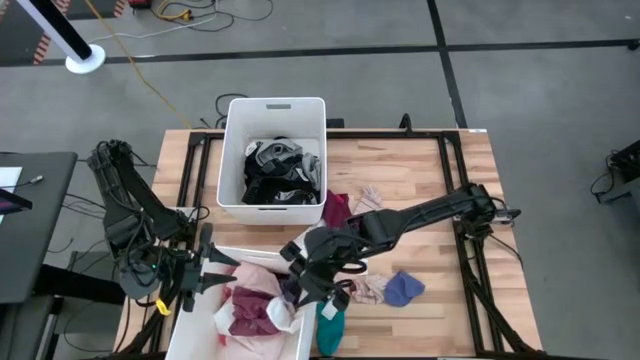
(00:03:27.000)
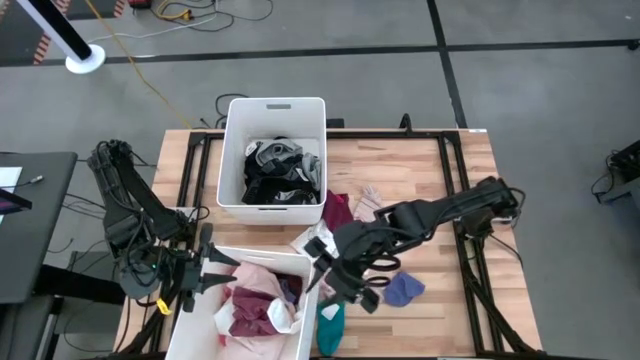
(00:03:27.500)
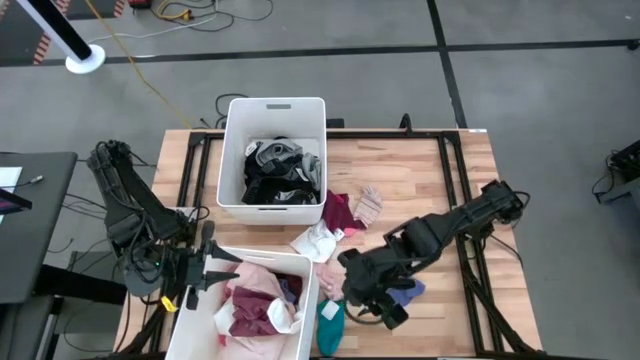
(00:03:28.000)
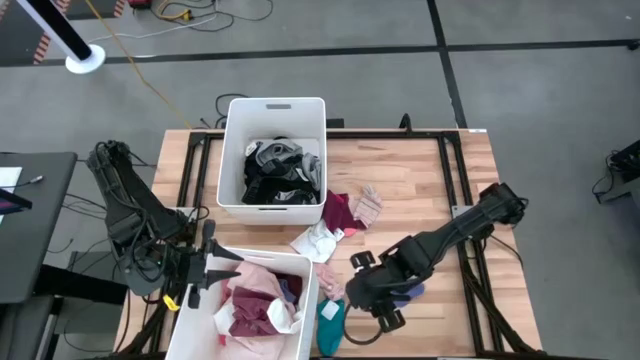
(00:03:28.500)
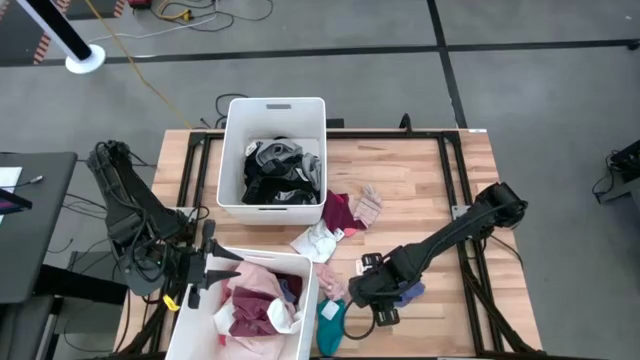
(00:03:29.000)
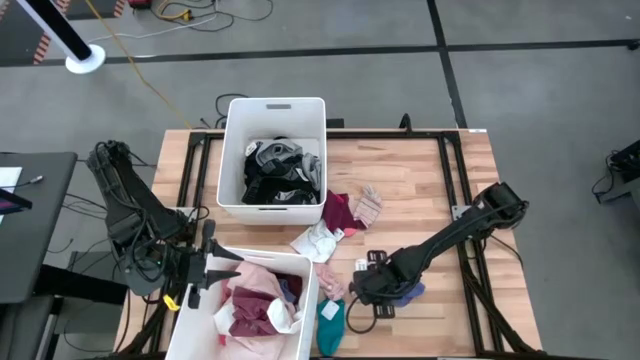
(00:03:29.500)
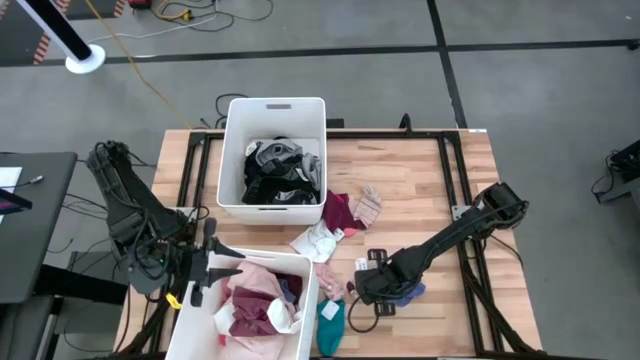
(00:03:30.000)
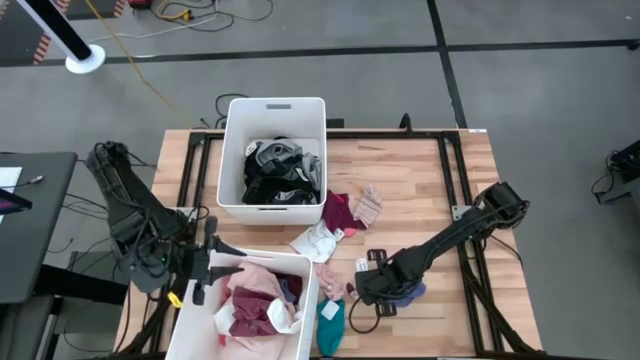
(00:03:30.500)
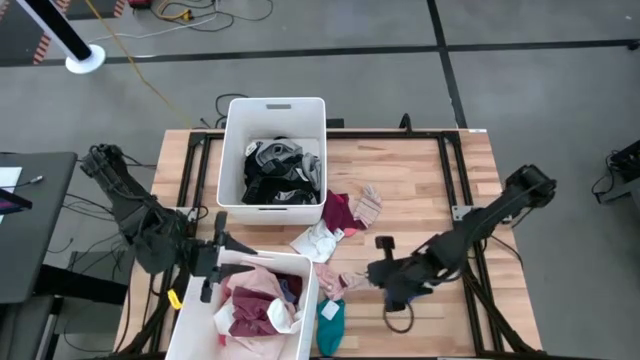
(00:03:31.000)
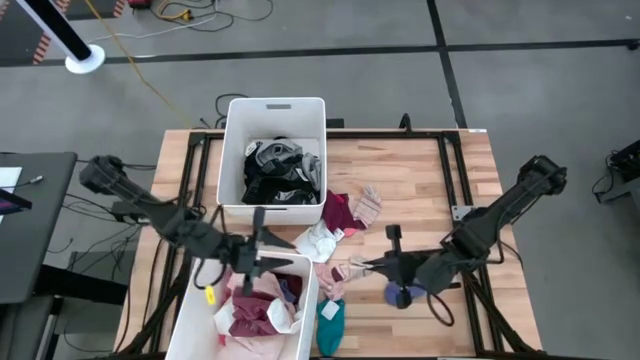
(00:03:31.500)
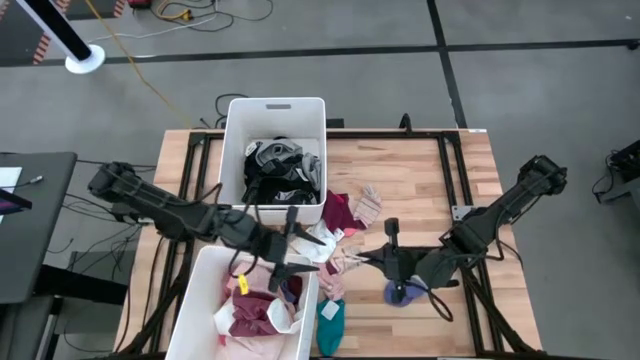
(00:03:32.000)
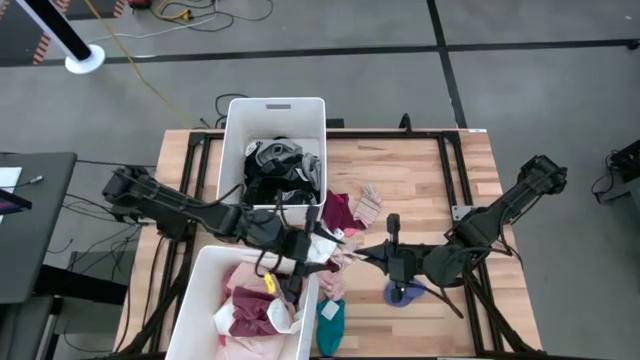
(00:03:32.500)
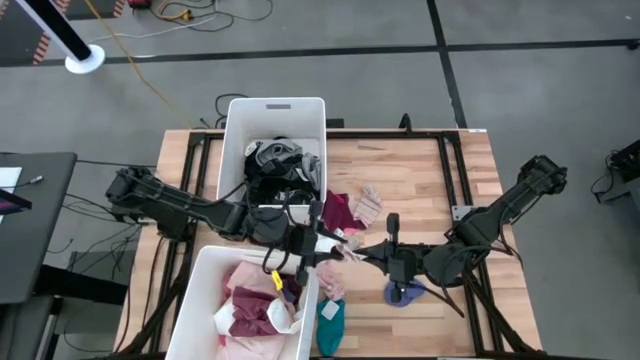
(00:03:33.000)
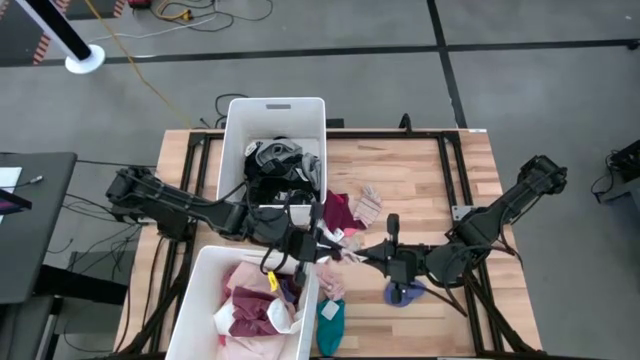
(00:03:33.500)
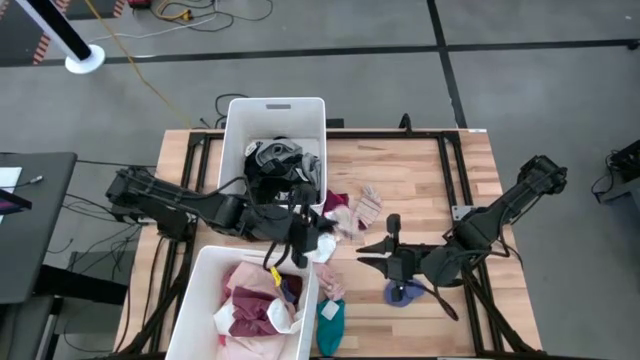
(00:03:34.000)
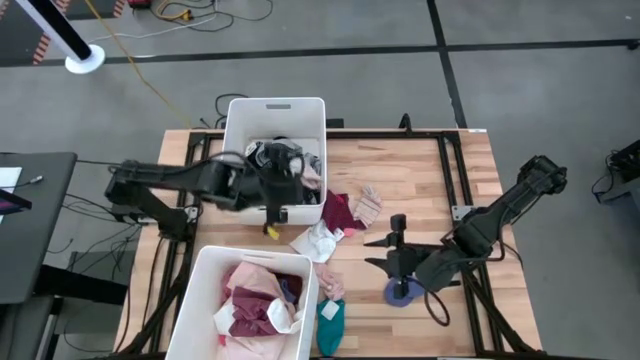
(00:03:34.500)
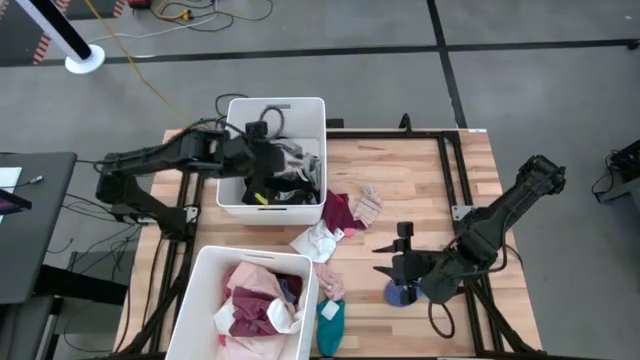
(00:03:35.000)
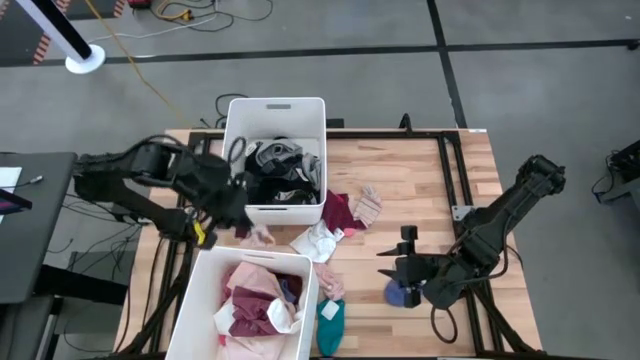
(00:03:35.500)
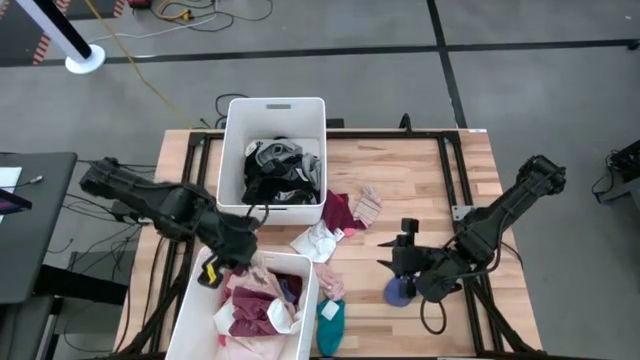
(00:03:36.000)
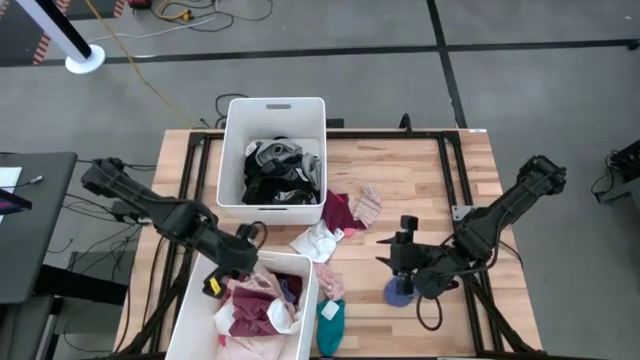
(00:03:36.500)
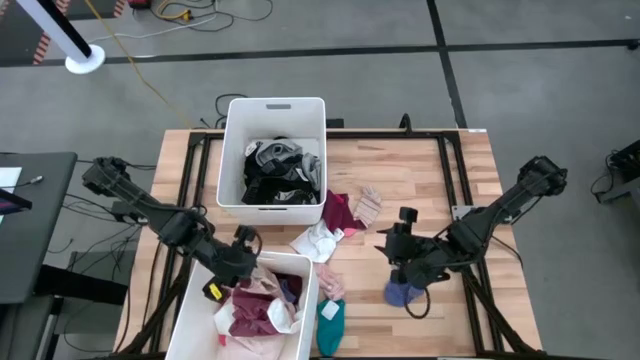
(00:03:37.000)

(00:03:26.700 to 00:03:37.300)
Task: Sort clothes
Put the light brown striped sock into the bottom white laundry bin

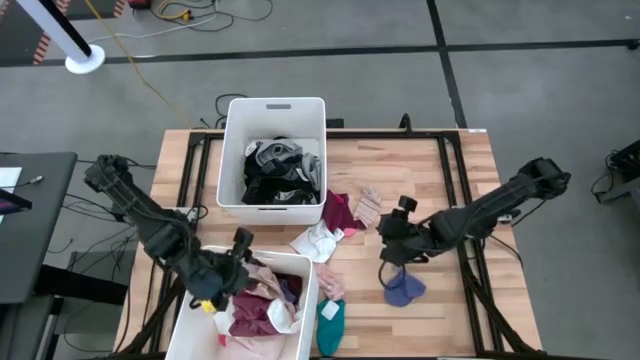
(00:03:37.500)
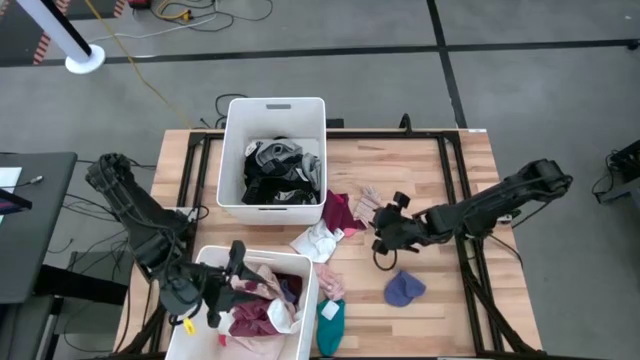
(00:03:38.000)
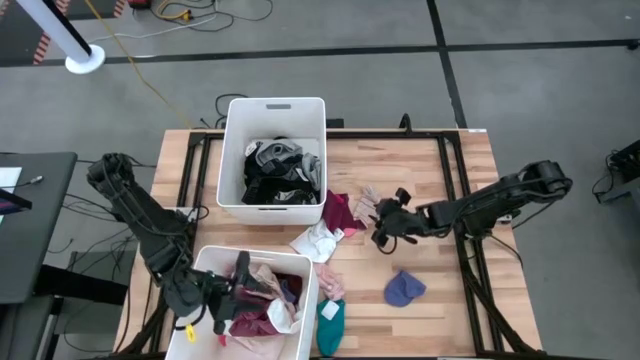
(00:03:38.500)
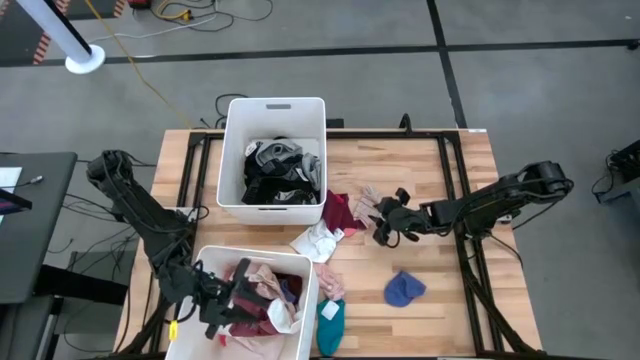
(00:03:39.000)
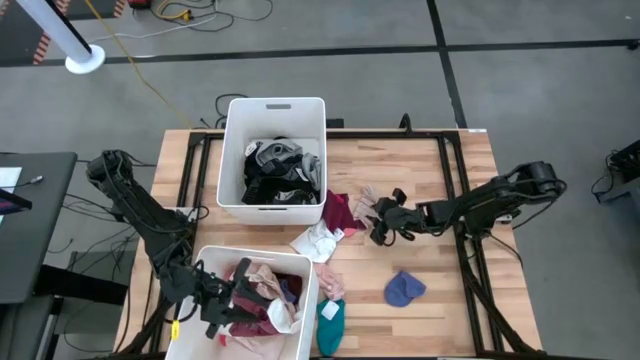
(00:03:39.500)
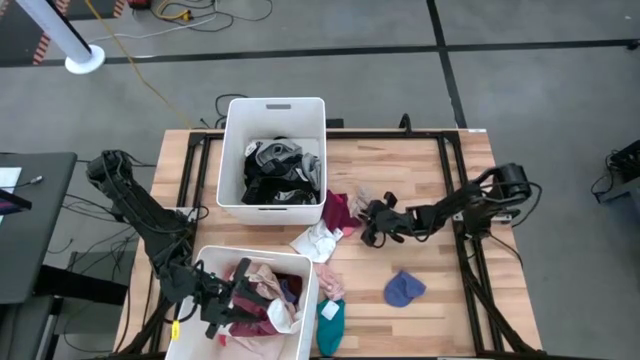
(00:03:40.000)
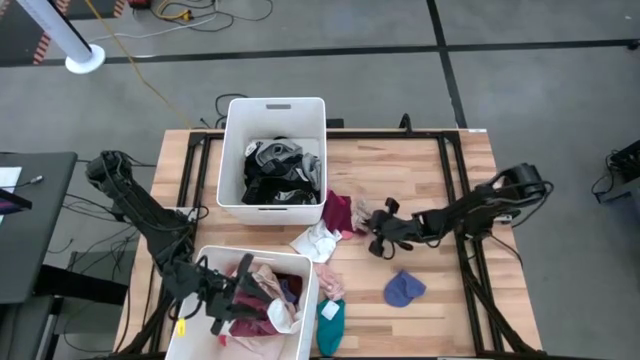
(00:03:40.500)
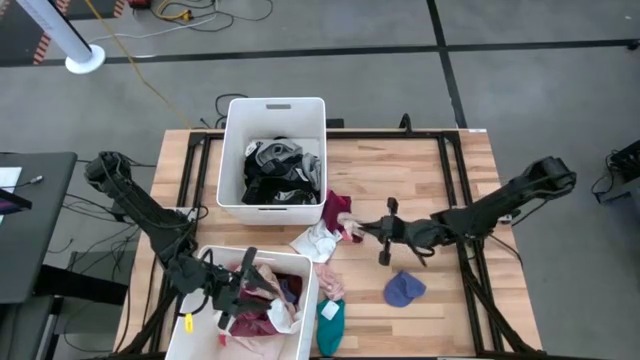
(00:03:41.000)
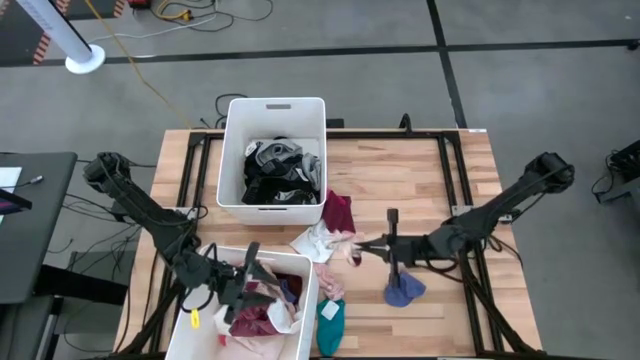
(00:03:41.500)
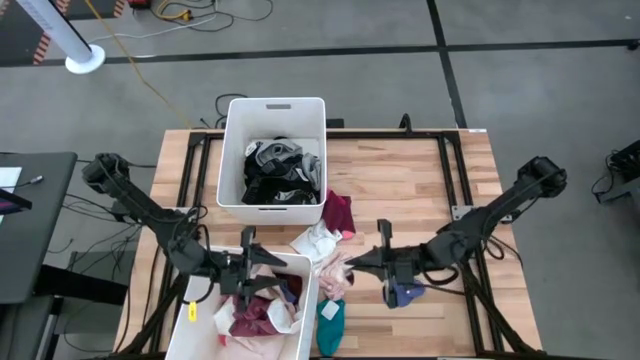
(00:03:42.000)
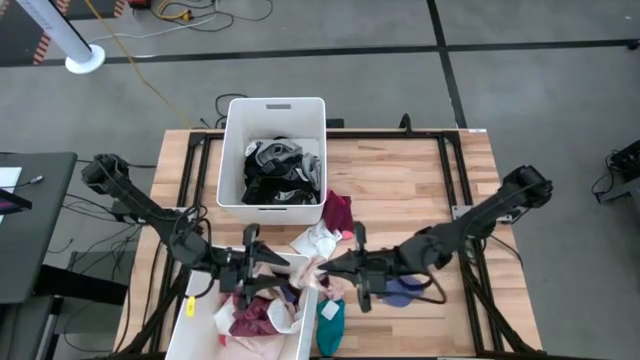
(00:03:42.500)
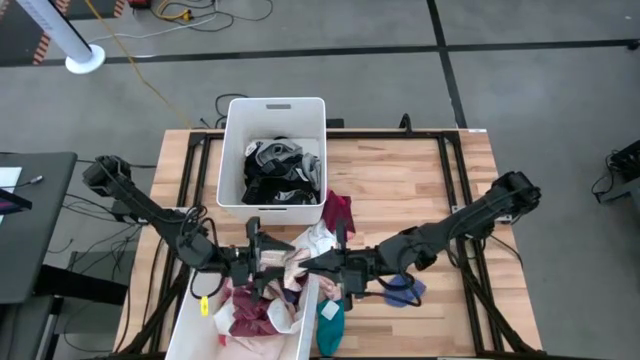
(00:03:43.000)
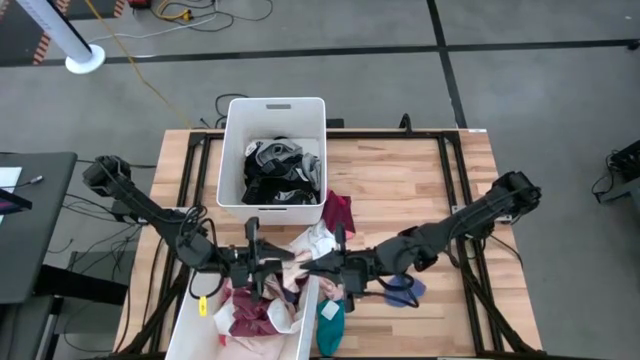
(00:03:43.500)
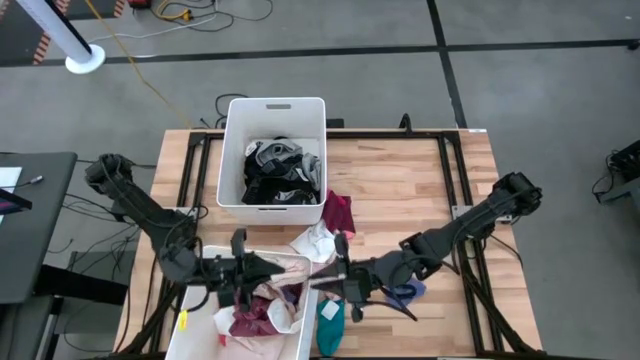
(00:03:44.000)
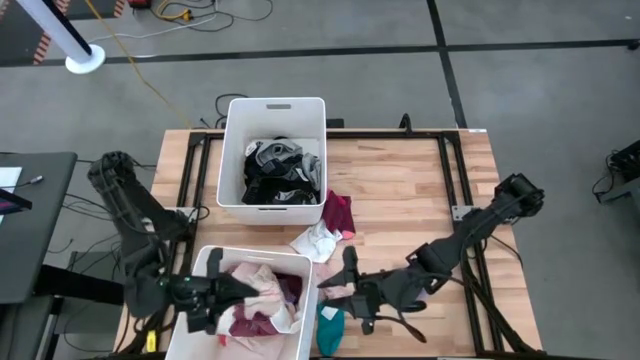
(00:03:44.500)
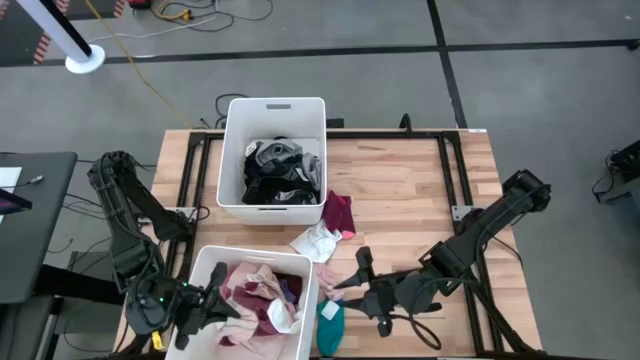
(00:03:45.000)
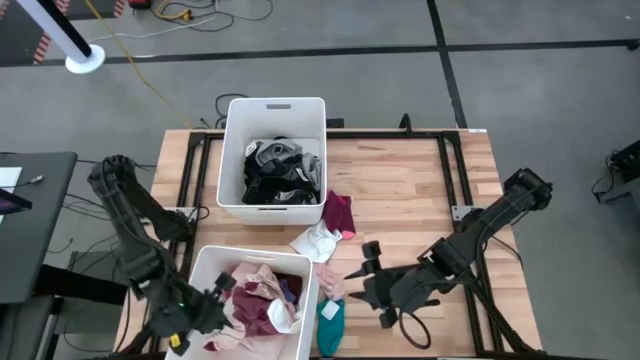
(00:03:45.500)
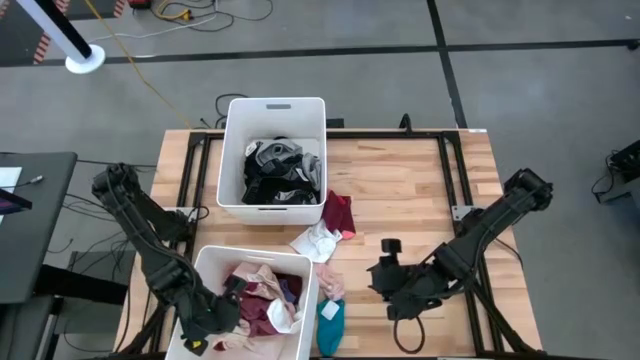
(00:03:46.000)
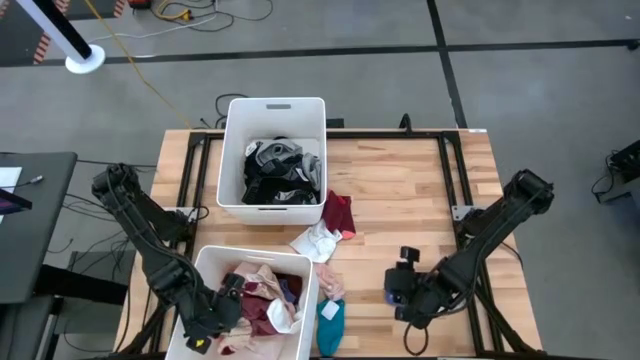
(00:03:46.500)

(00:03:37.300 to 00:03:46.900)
Put the light brown striped sock into the bottom white laundry bin
